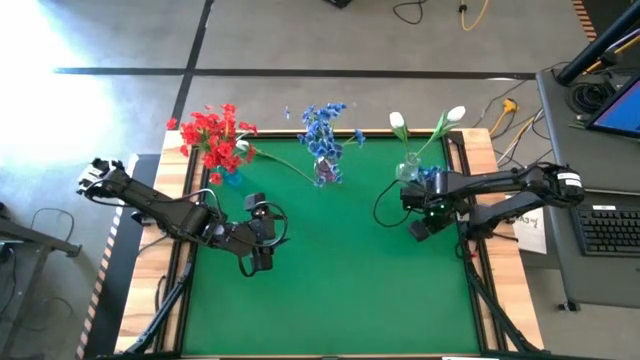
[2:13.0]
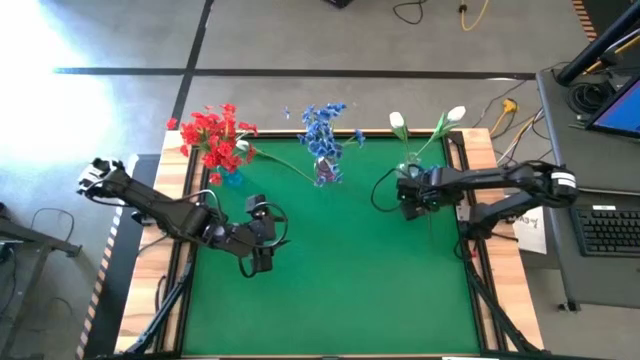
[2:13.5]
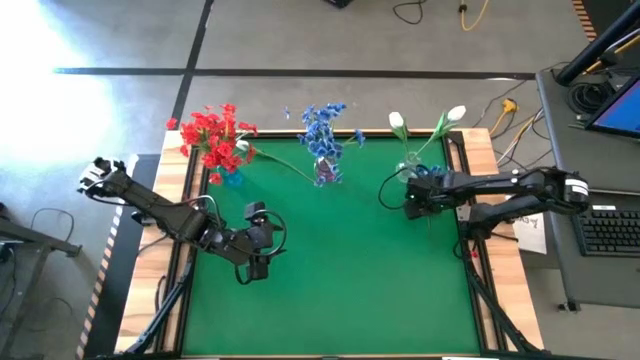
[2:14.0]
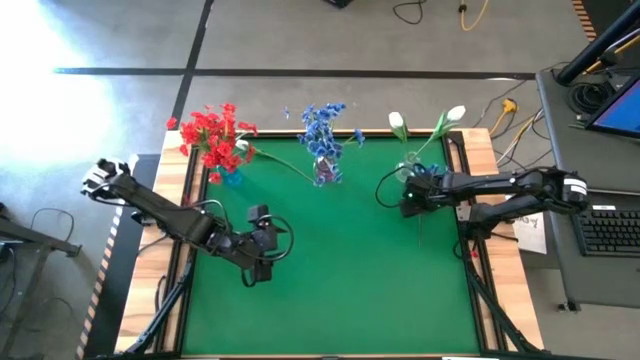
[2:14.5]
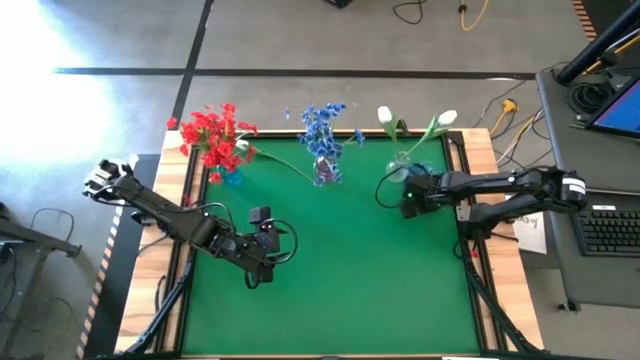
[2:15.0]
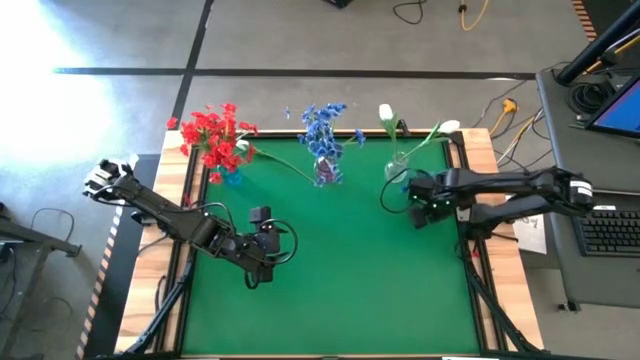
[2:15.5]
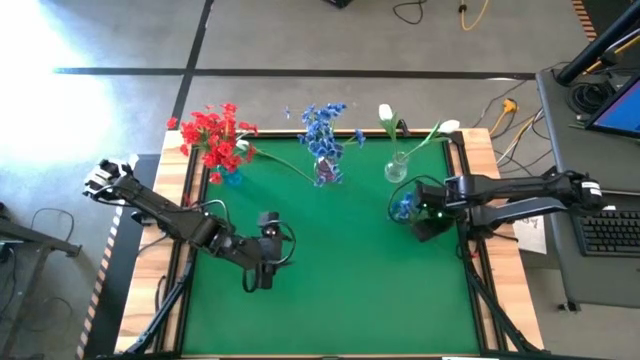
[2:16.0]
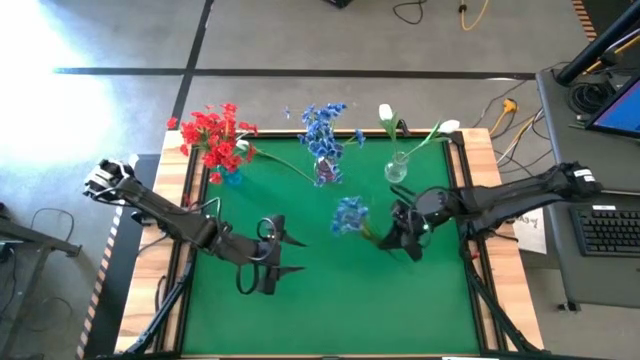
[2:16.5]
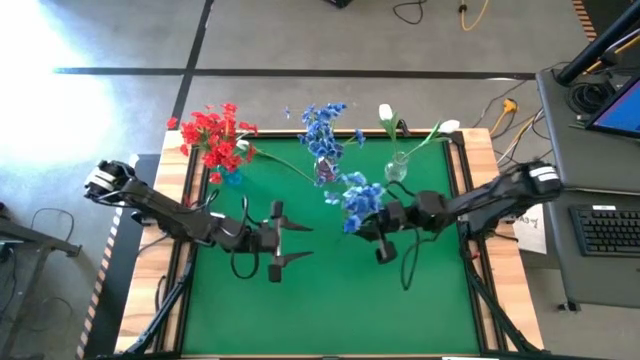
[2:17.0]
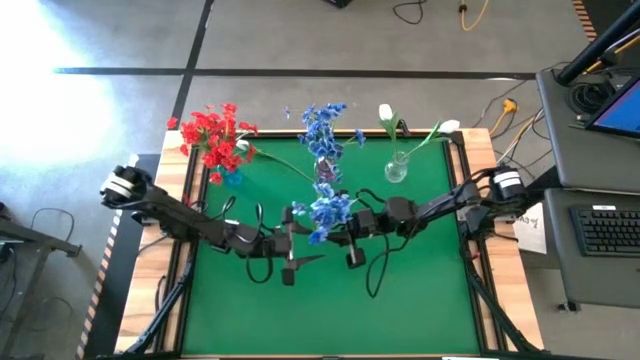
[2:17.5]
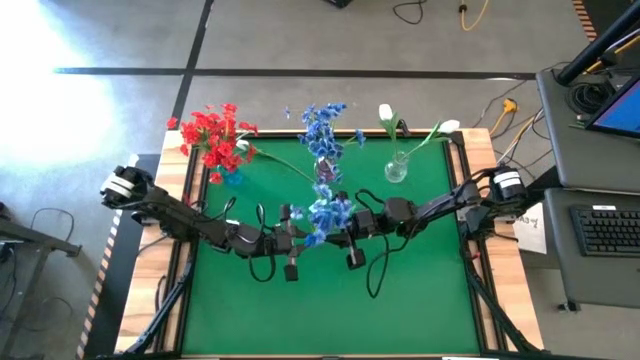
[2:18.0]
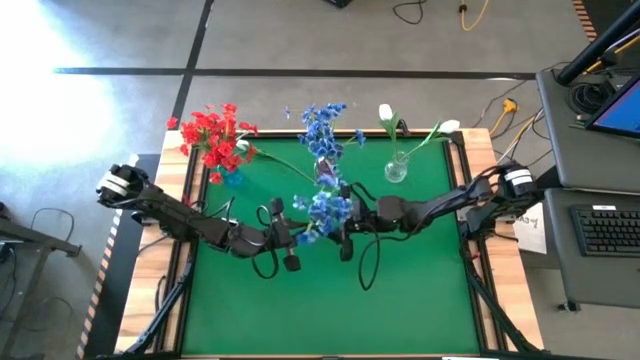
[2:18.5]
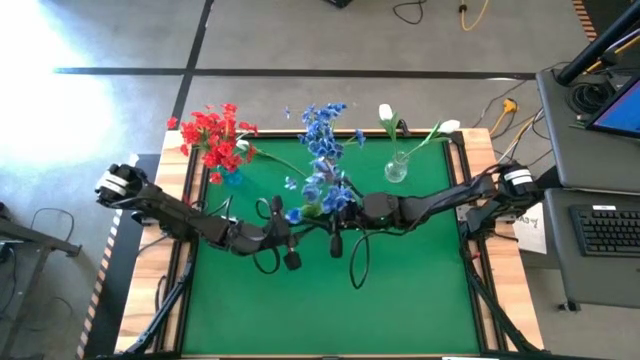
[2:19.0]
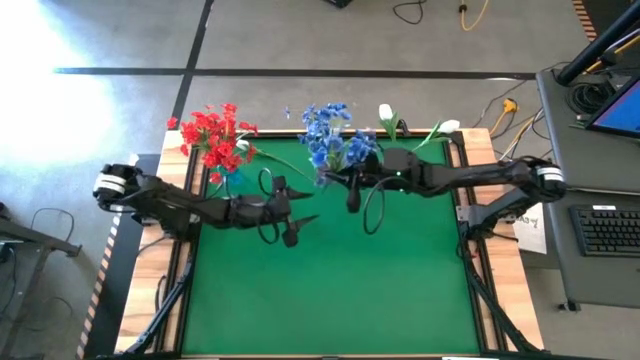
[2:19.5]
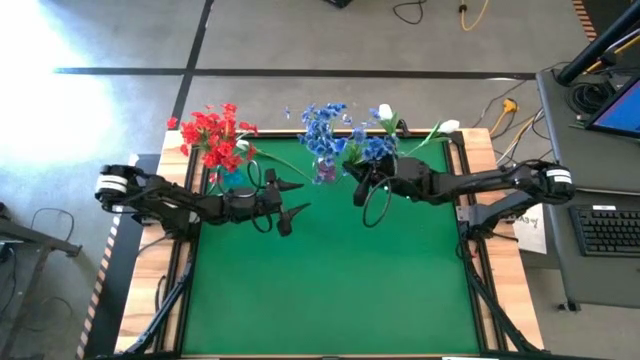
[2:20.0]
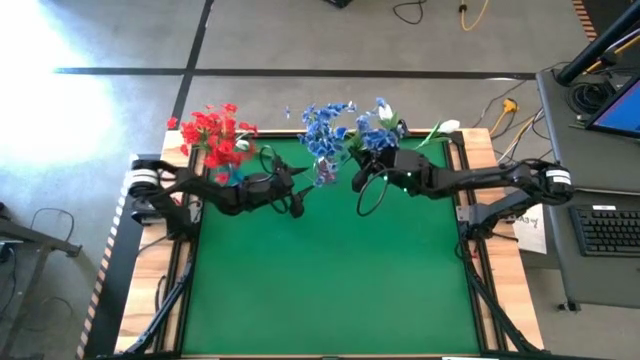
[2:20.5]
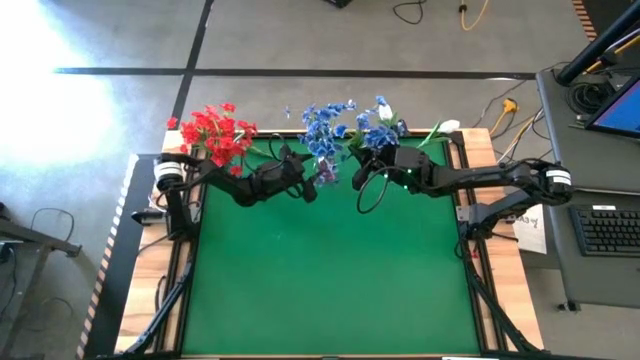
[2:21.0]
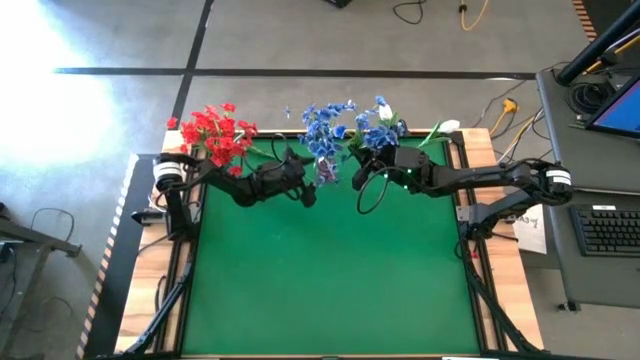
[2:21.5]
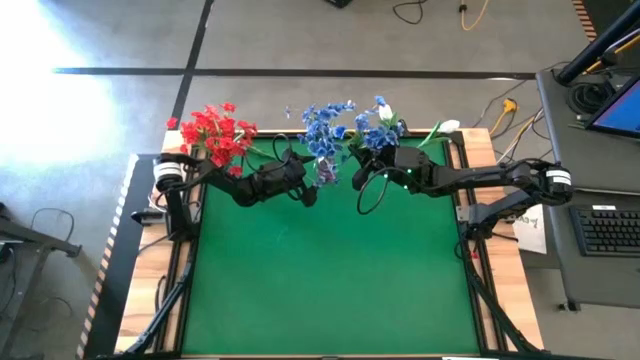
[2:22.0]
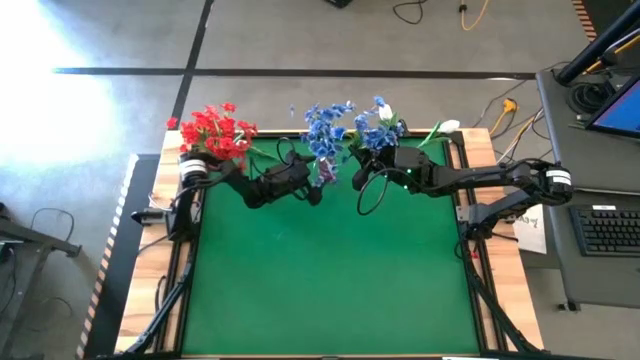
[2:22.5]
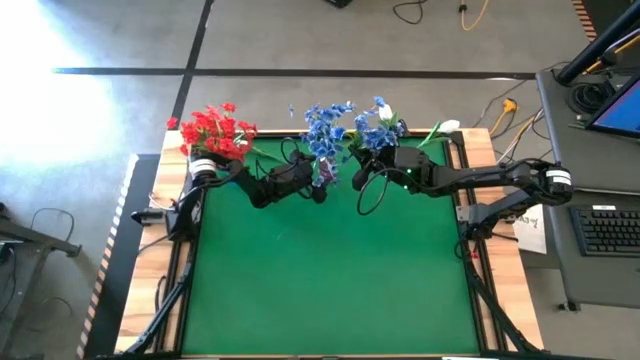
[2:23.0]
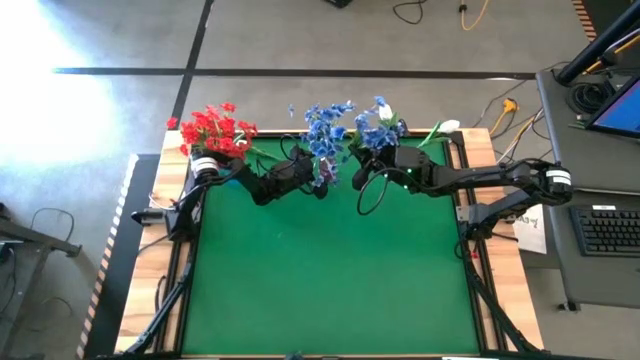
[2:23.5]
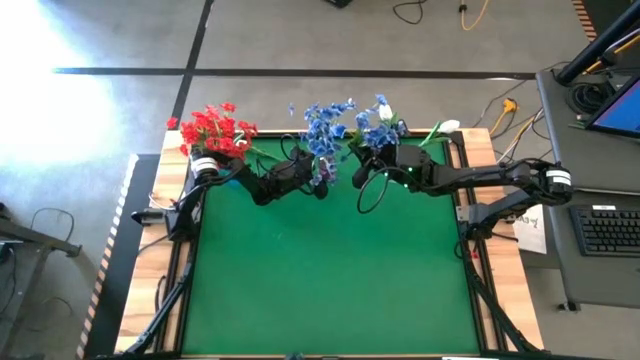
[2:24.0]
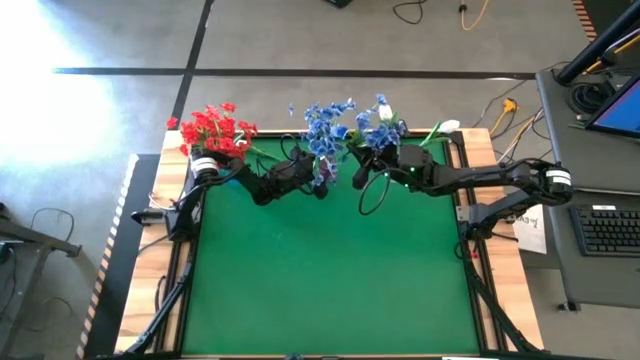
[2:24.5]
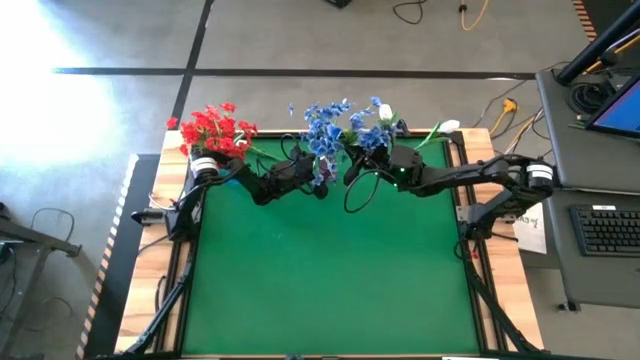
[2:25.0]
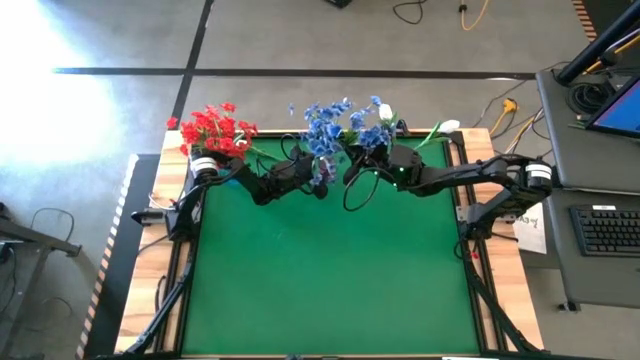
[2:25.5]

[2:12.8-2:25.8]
Task: Sort flowers into vase by color
Put the blue flowers into the purple vase

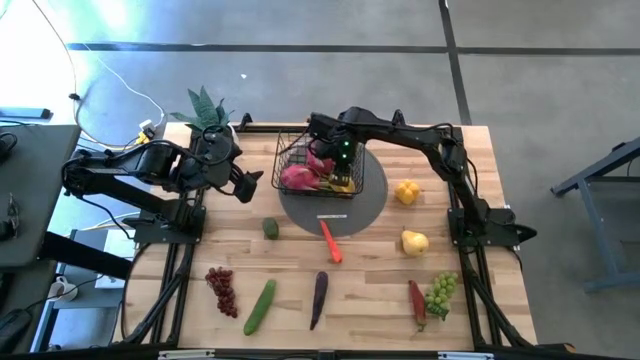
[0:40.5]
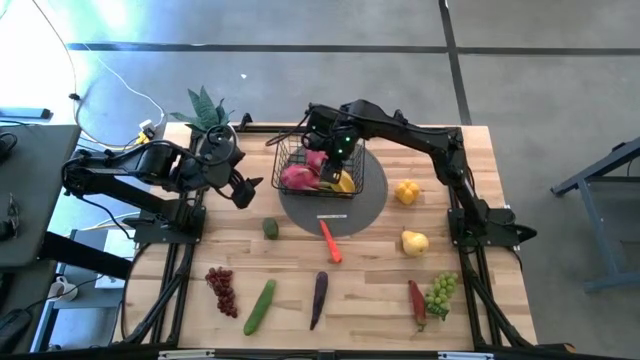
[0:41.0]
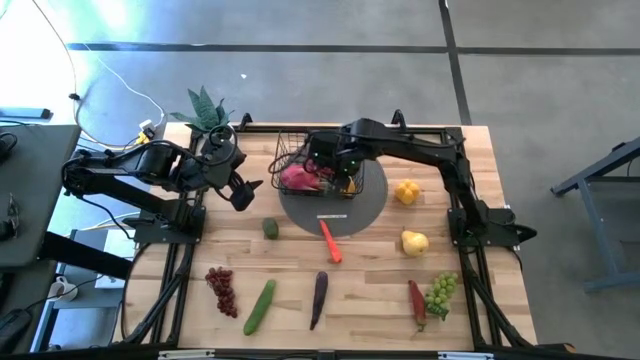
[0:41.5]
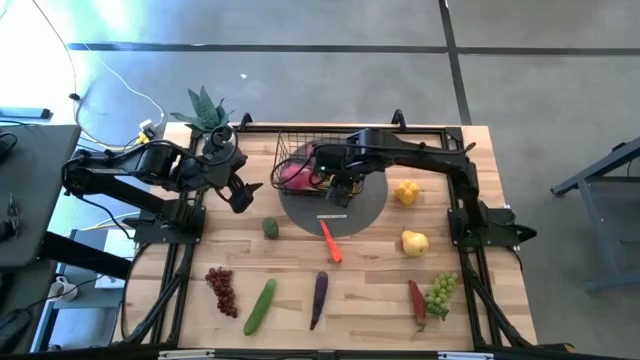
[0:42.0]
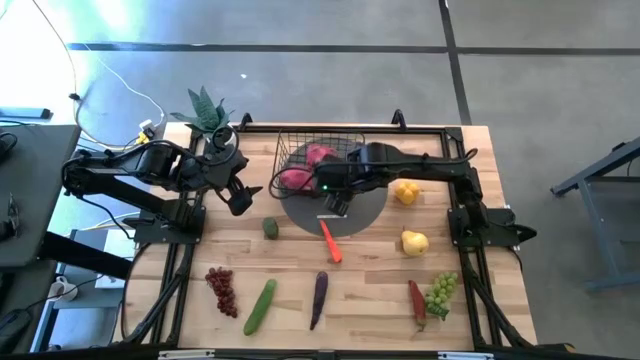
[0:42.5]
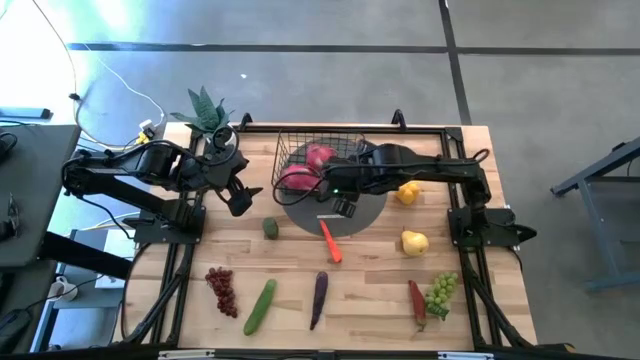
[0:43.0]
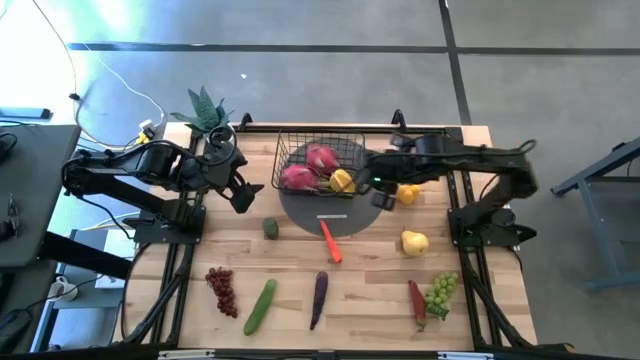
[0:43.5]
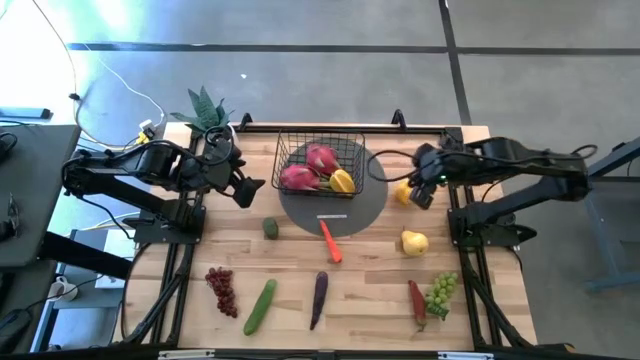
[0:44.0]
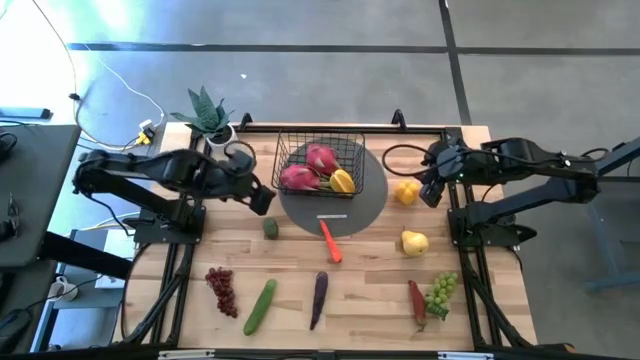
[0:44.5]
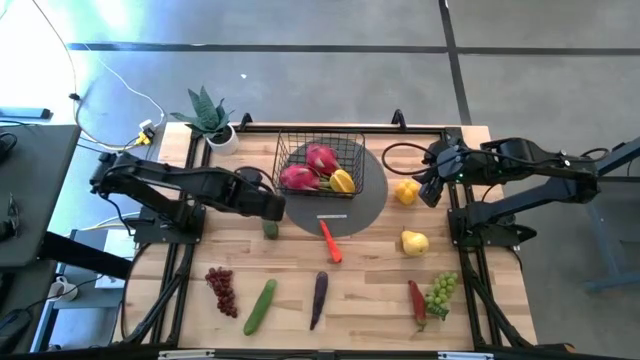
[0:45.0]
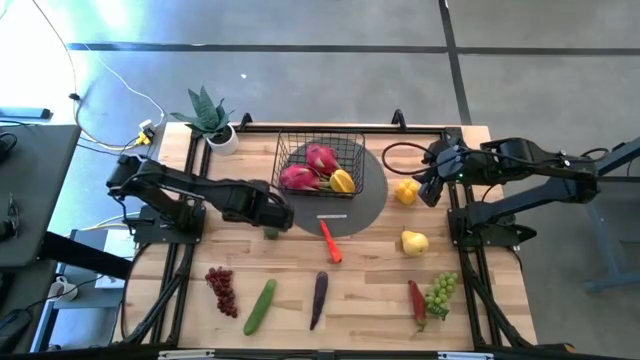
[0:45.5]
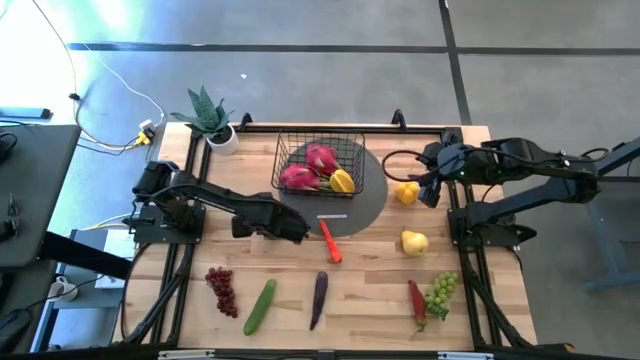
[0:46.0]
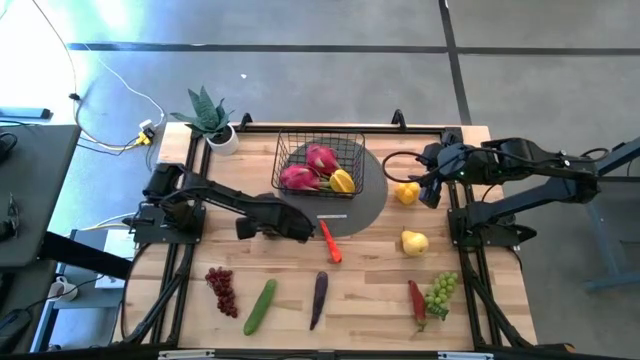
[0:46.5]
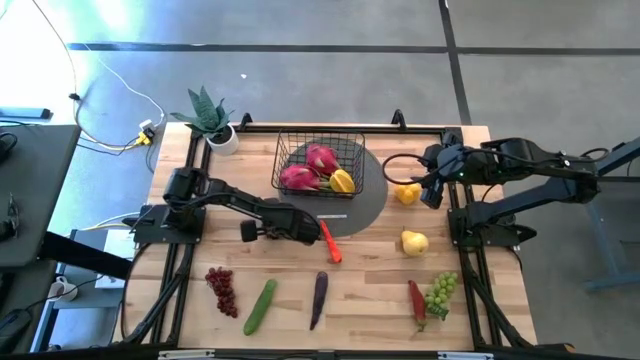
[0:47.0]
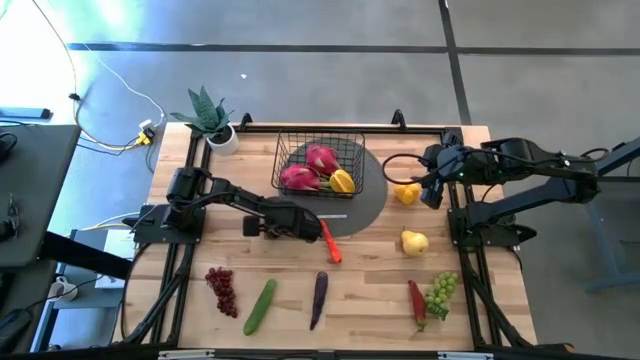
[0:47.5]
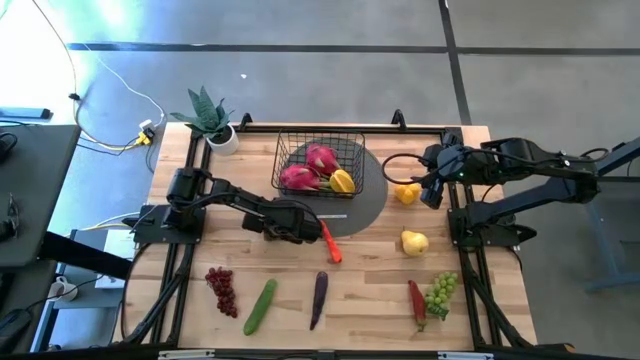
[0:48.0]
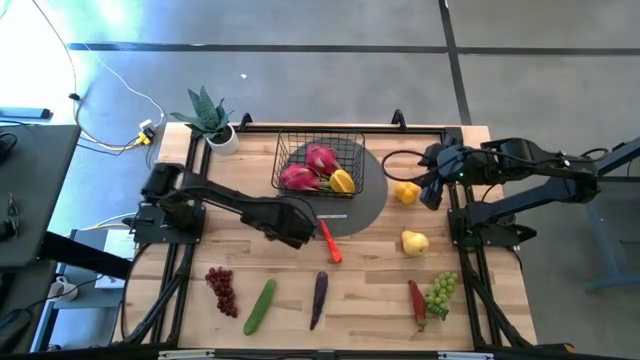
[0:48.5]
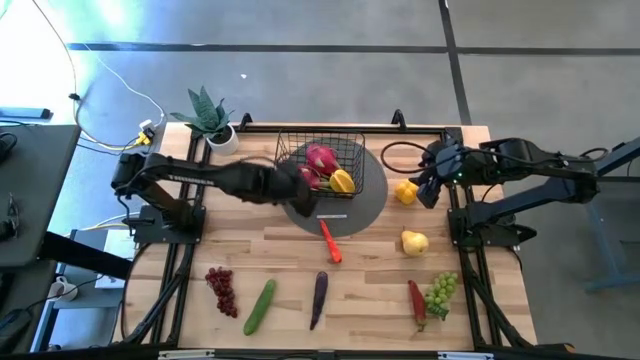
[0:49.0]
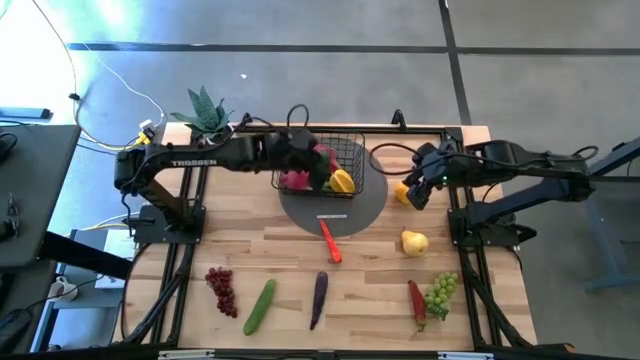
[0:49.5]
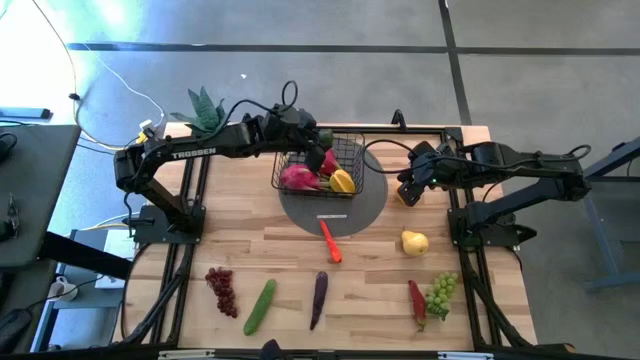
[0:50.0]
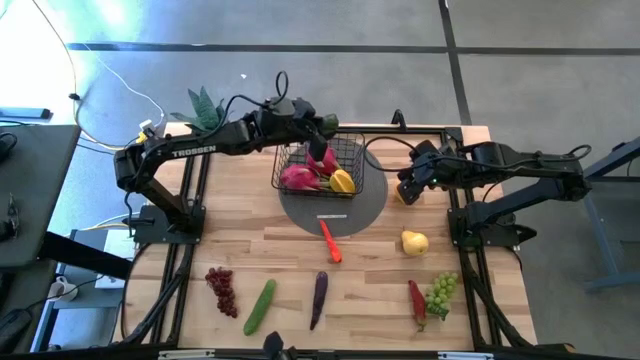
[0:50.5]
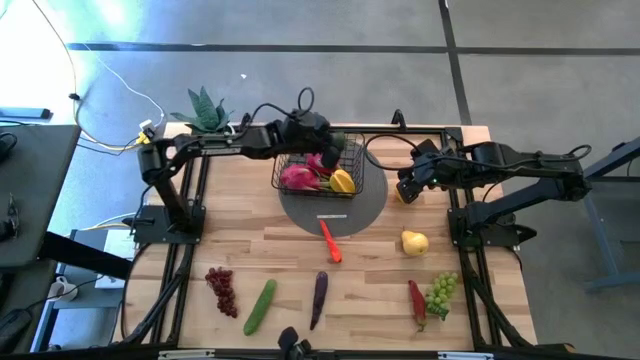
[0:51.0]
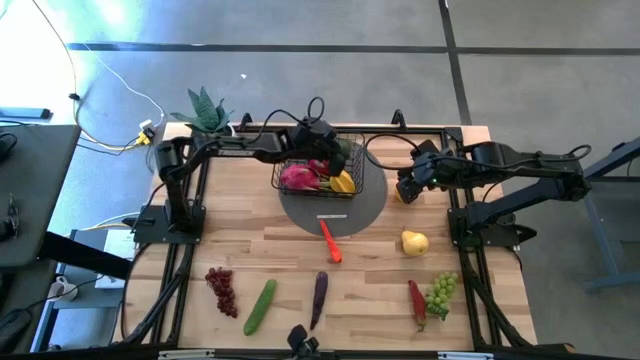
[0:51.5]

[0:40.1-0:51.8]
Task: Build produce basket
Put the green lime into the black wire basket
